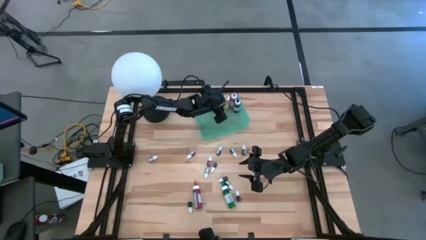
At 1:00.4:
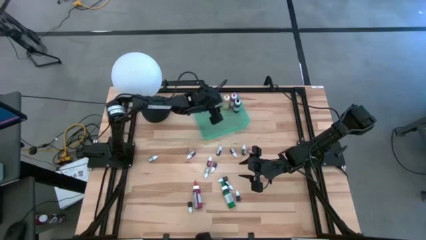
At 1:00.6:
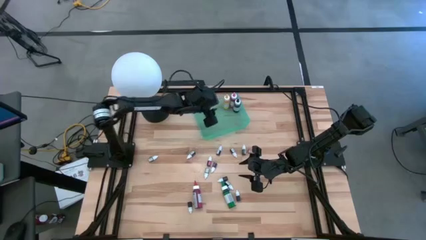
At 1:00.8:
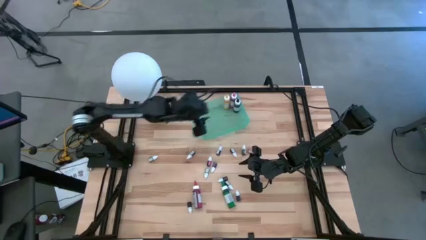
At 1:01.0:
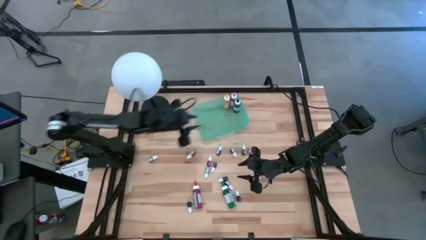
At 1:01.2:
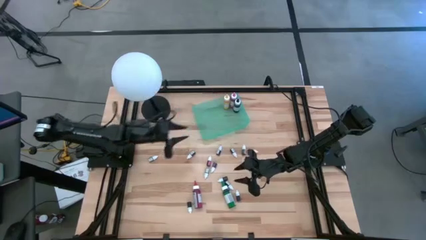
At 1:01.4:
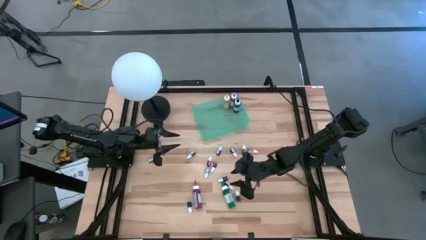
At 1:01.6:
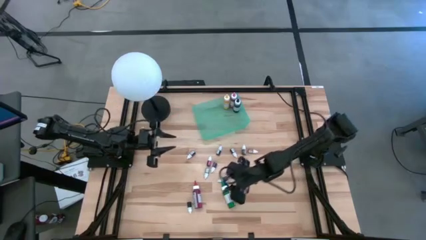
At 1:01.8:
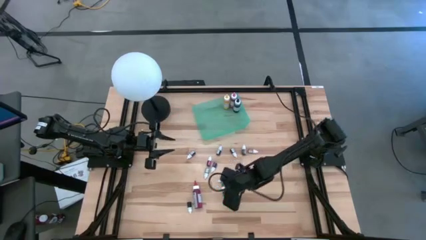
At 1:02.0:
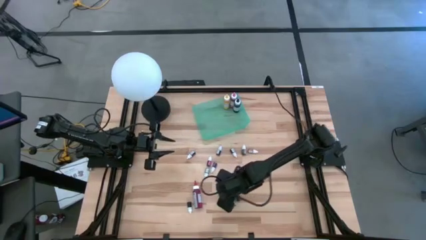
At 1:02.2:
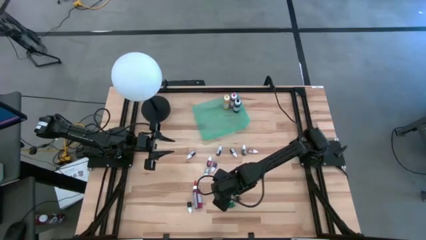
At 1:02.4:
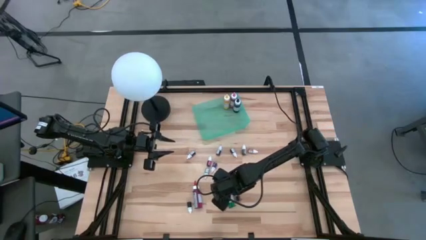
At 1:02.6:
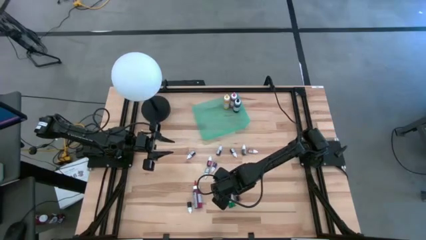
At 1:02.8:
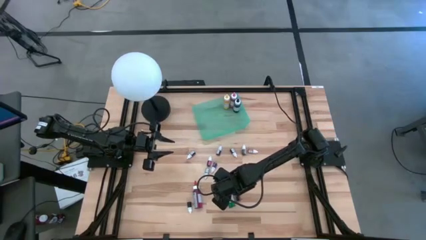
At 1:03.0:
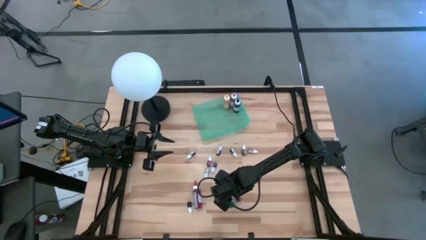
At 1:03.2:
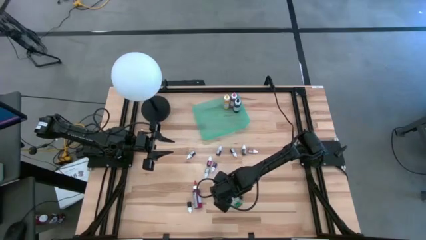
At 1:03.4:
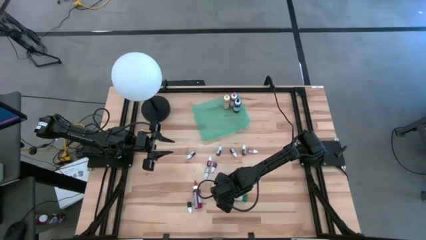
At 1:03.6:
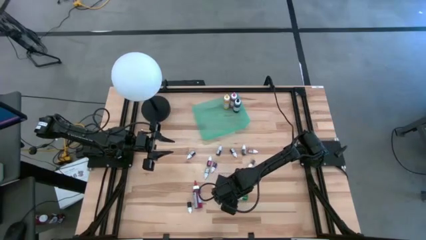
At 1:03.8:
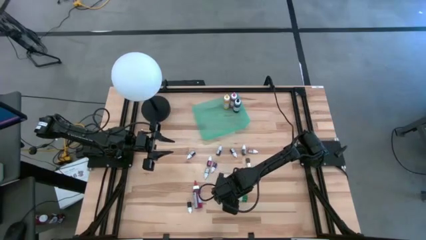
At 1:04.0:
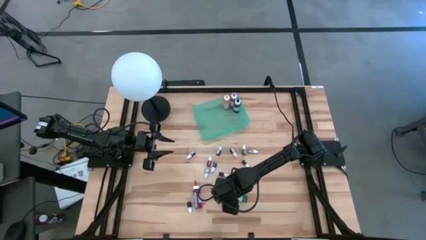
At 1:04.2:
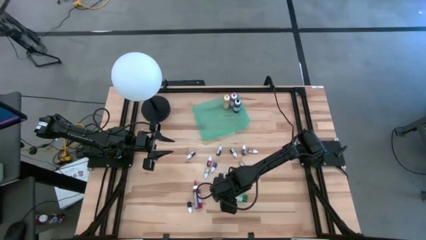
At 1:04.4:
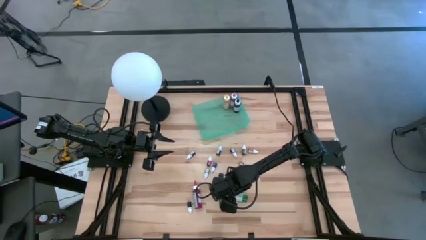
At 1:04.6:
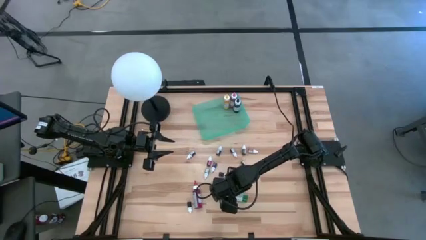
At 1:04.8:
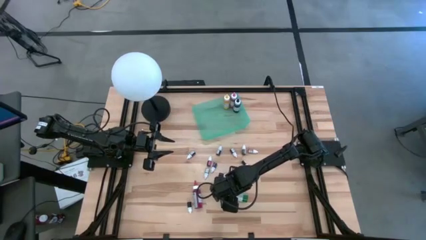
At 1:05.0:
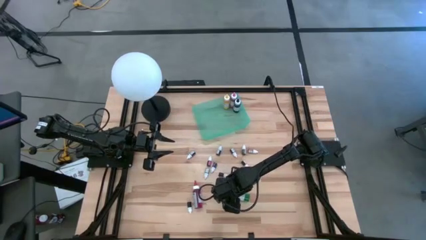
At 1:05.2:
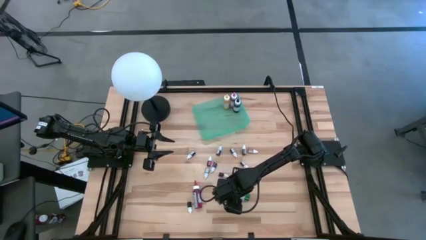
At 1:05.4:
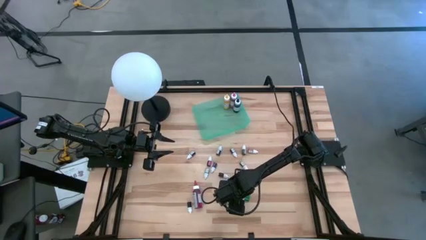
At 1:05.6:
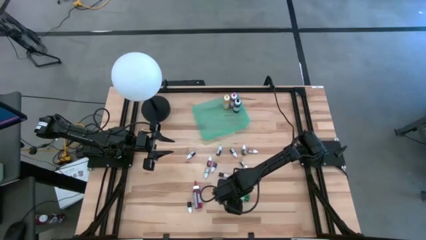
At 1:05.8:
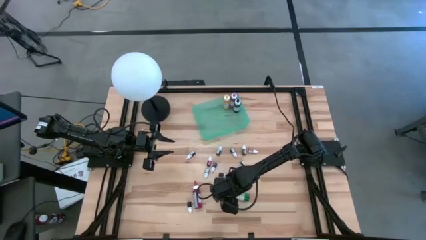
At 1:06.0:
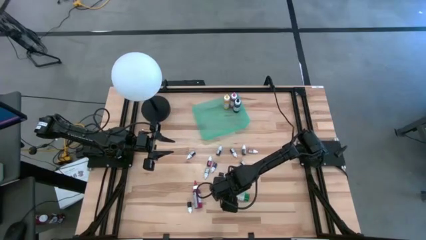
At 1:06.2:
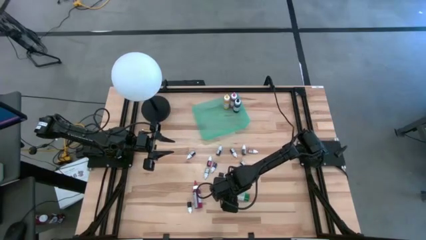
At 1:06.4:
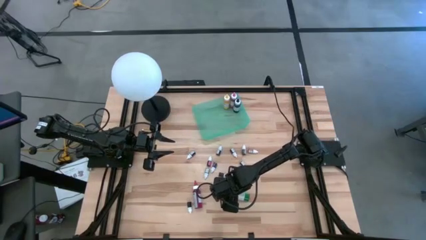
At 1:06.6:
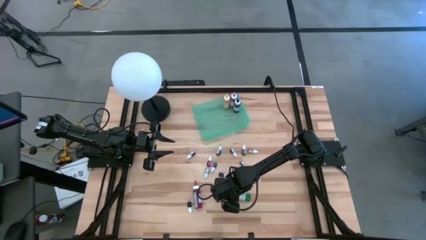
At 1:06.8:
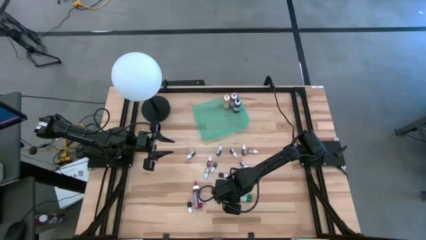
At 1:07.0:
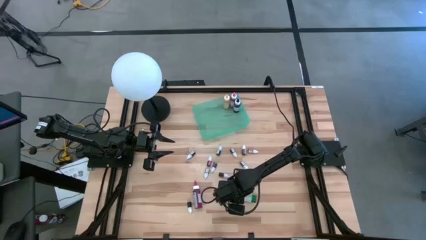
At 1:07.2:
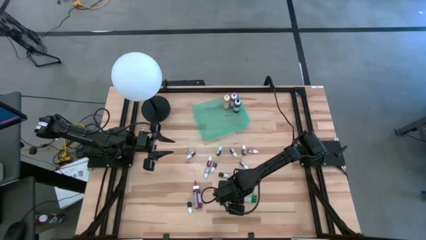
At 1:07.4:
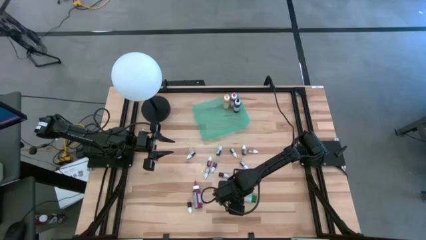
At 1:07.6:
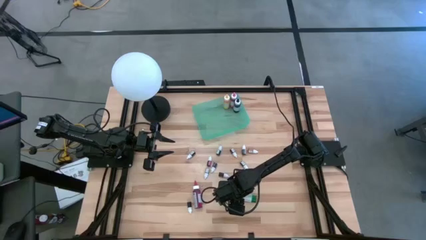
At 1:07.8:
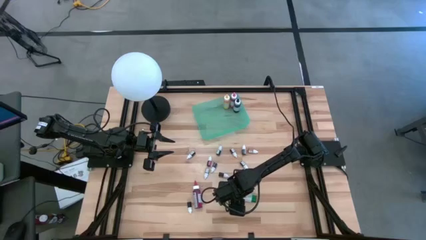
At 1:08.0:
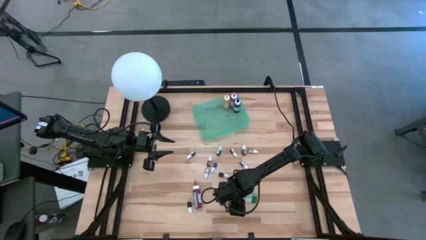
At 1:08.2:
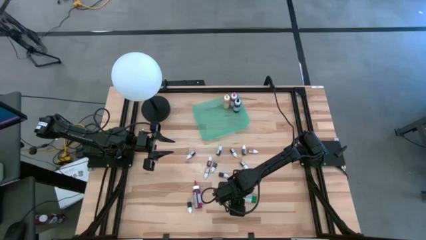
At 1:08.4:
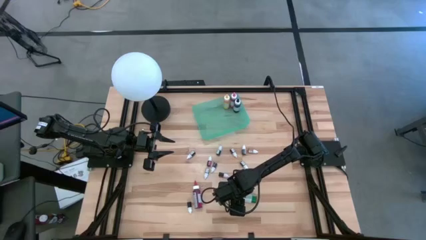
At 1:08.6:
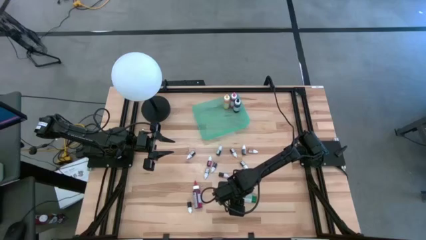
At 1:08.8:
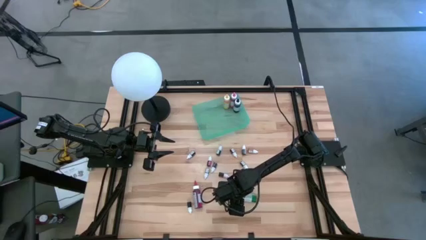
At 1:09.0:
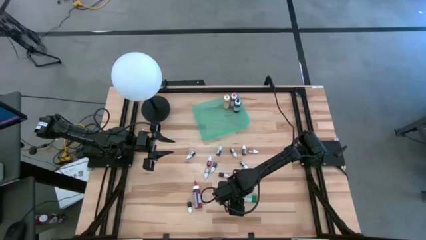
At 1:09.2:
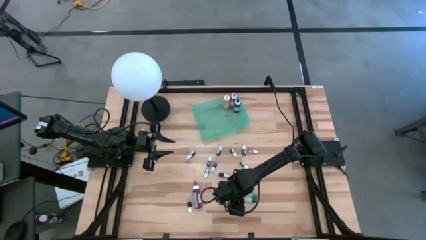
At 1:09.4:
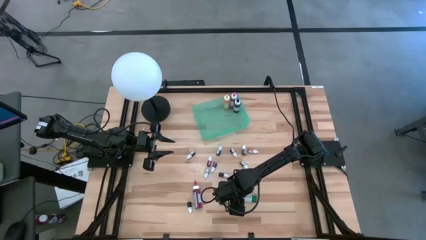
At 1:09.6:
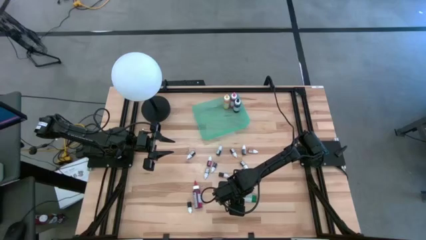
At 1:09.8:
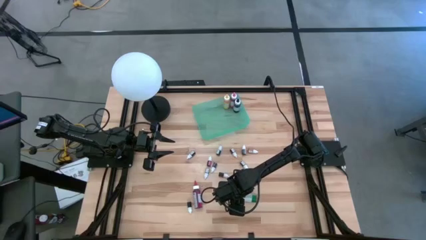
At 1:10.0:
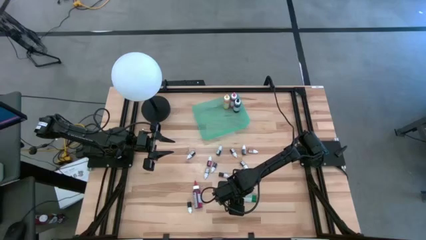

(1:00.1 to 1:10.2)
Task: Pick & Place food coloring
Put the green food coloring bottle into the green bin

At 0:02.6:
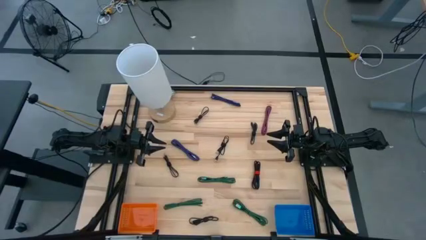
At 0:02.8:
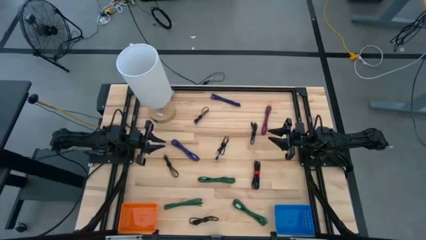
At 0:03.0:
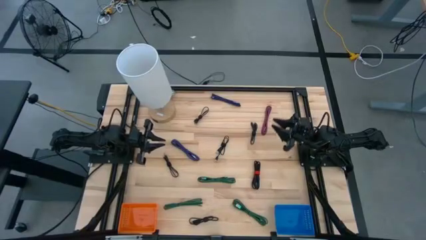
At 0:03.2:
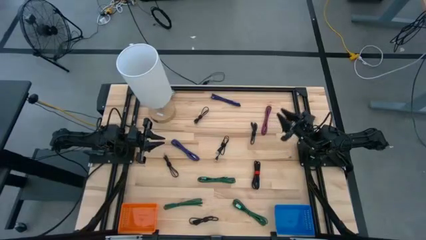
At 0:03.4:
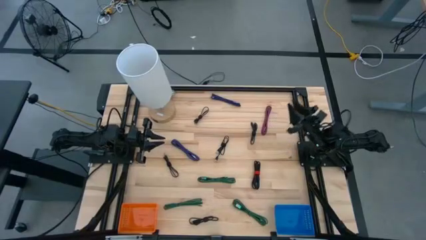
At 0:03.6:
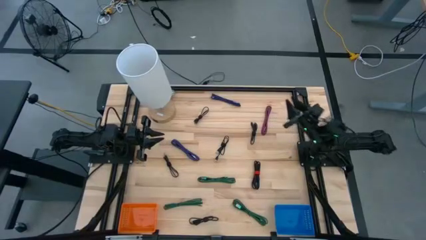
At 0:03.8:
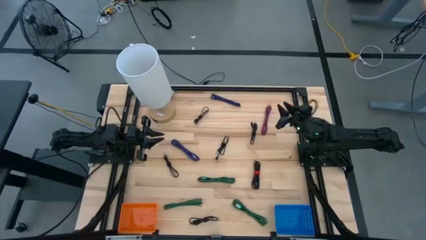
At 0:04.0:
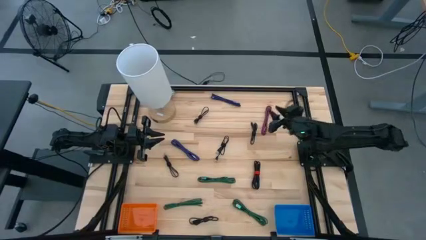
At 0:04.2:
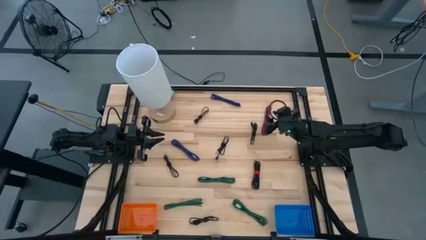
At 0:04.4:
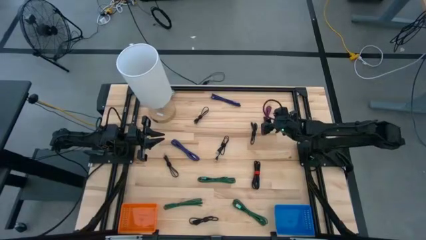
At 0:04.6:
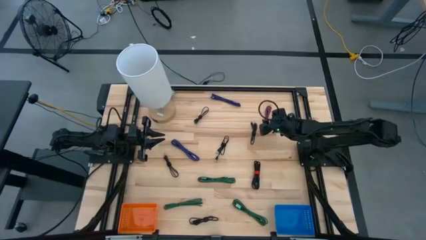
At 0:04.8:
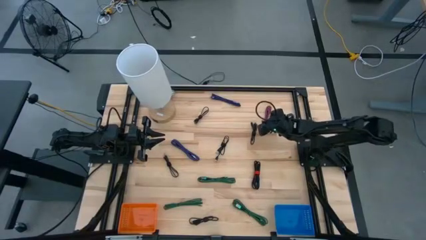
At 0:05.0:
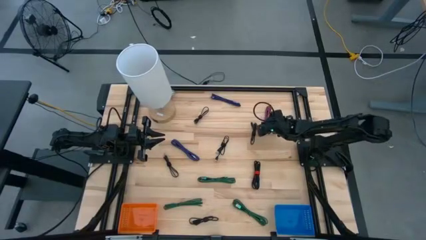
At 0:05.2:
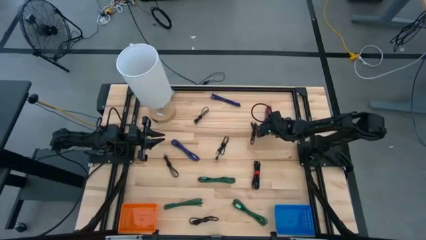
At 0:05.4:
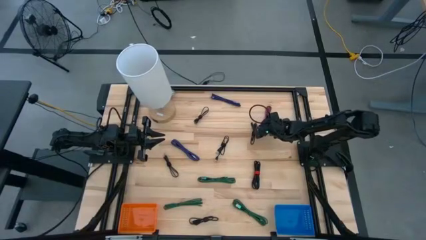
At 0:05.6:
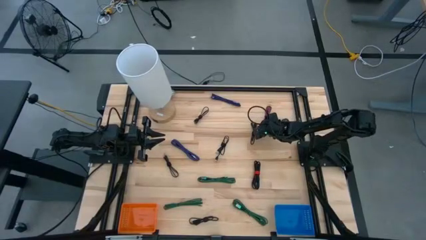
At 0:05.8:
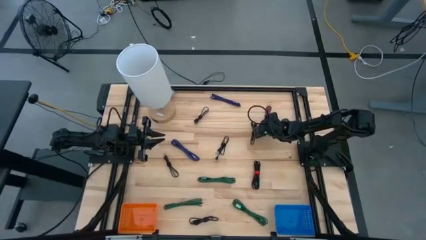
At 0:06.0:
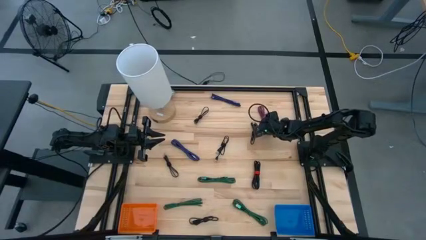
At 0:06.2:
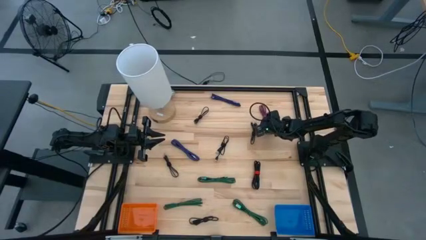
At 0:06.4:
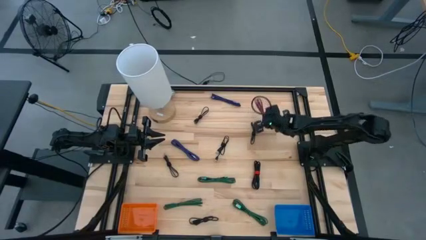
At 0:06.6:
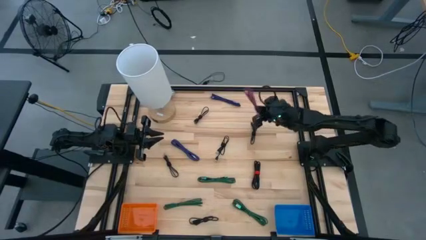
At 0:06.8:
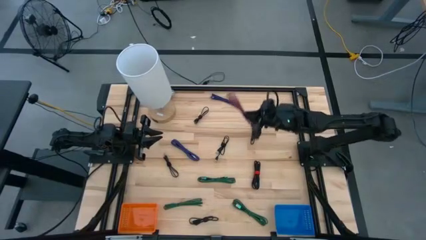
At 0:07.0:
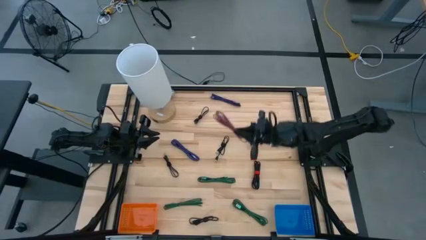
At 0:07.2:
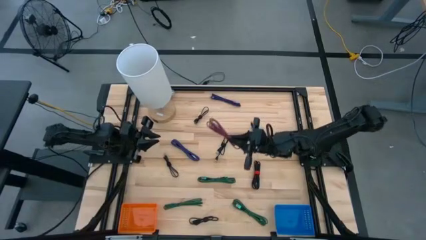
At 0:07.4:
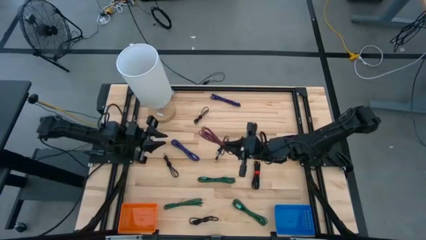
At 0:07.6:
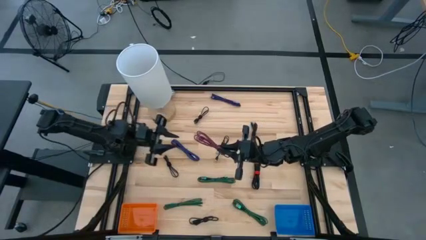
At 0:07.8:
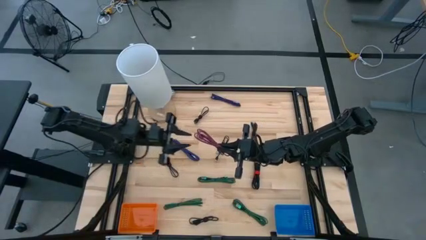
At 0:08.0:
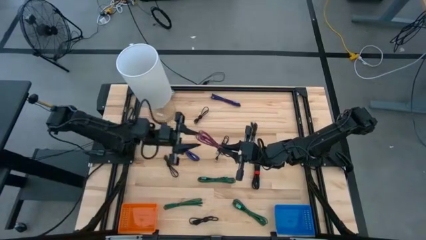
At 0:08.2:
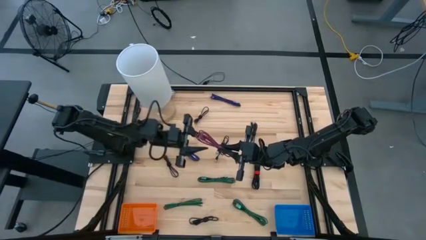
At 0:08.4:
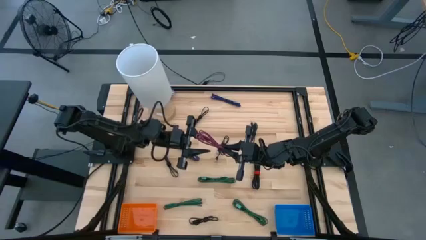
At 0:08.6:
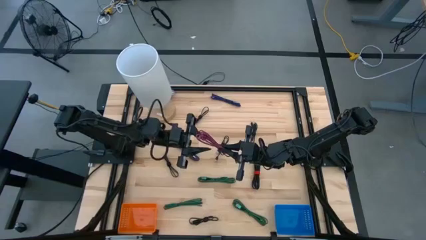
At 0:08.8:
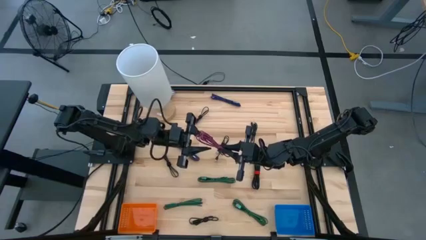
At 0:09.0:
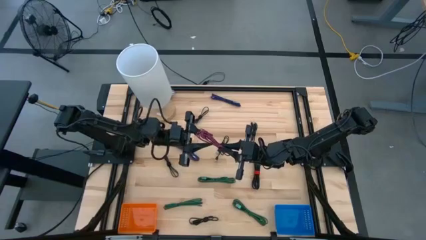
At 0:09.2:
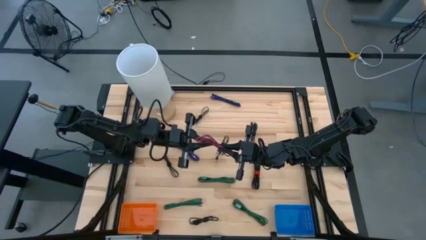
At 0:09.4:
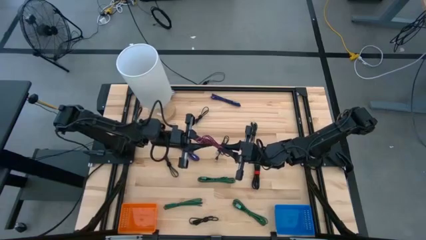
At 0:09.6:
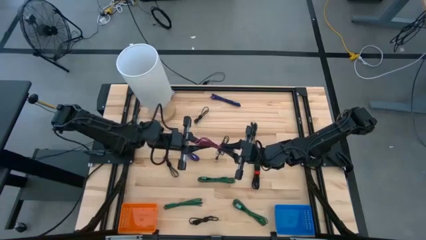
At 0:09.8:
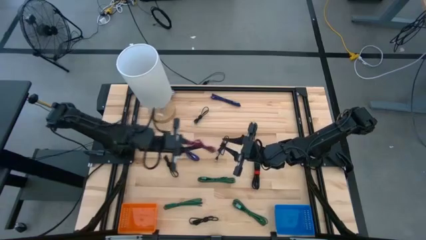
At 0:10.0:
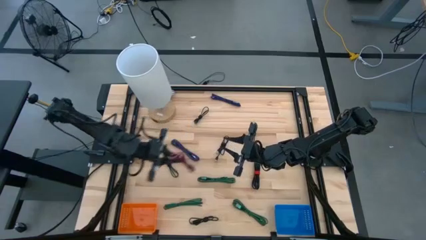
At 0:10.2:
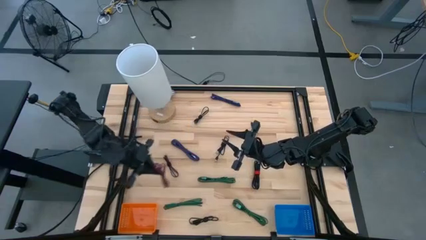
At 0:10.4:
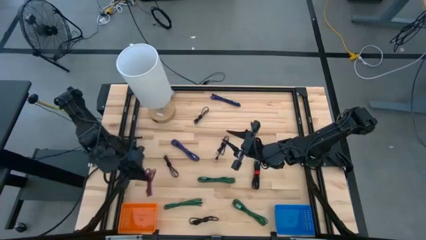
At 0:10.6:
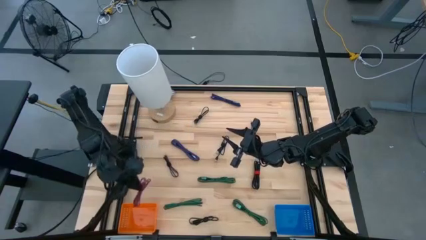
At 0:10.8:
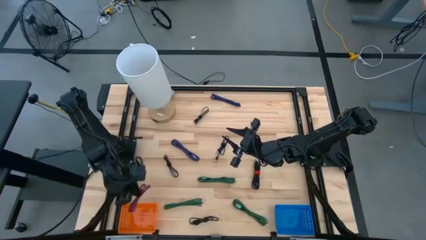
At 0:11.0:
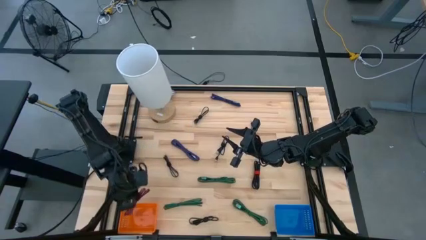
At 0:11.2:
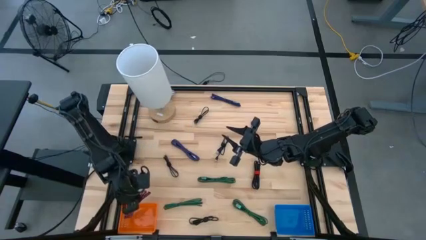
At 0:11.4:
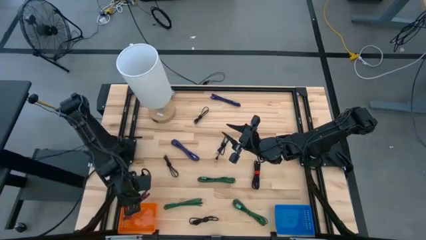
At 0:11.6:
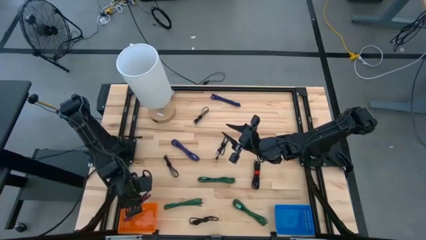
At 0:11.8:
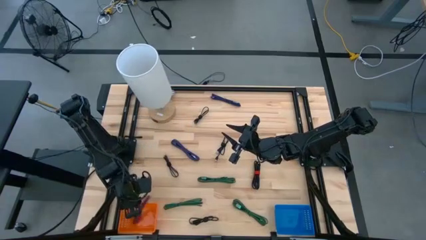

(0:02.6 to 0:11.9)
Task: Pick & Place USB Port
Put the red patterned charger cable into the orange bin
